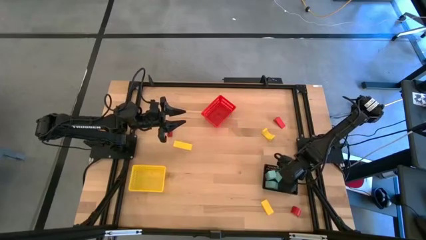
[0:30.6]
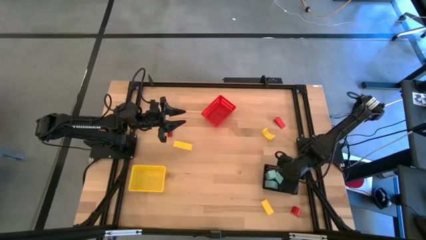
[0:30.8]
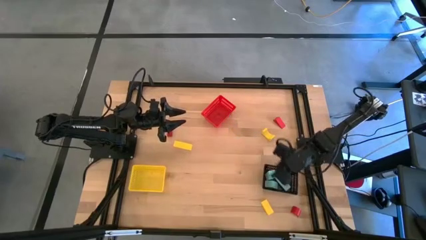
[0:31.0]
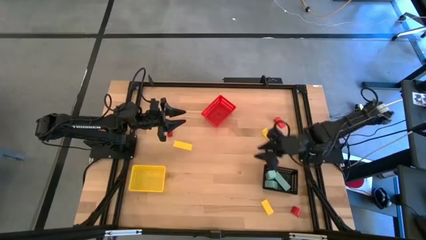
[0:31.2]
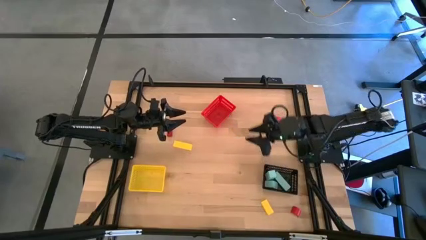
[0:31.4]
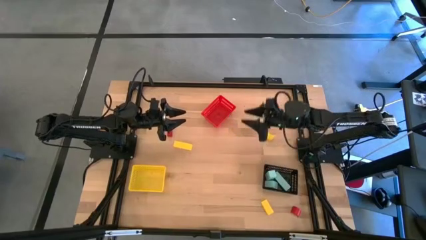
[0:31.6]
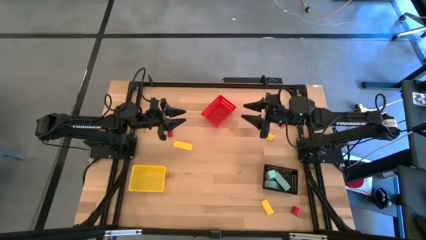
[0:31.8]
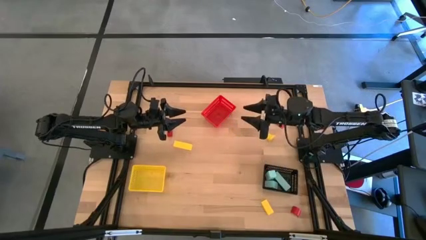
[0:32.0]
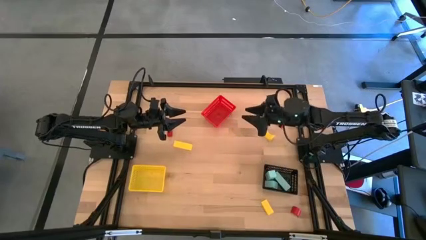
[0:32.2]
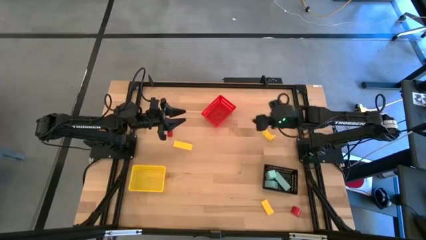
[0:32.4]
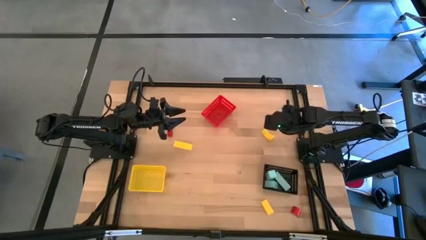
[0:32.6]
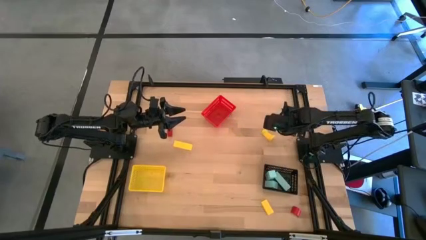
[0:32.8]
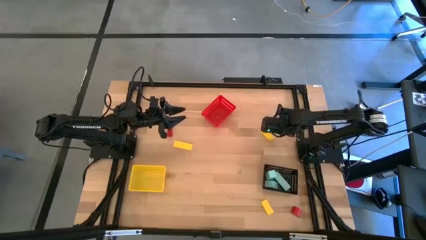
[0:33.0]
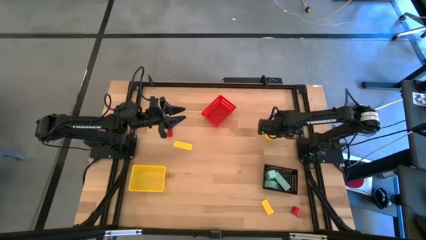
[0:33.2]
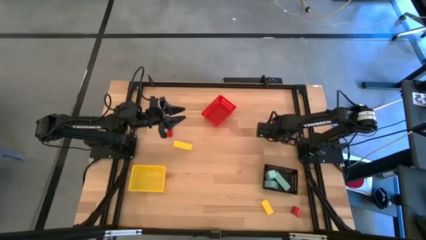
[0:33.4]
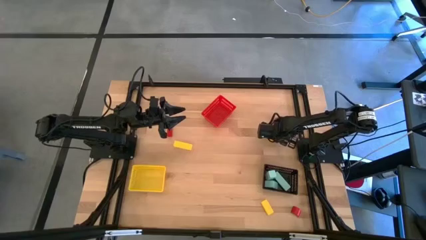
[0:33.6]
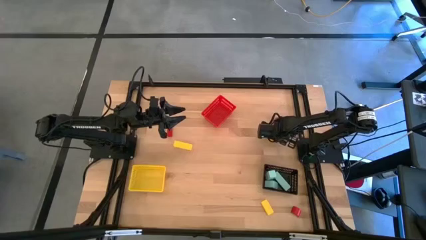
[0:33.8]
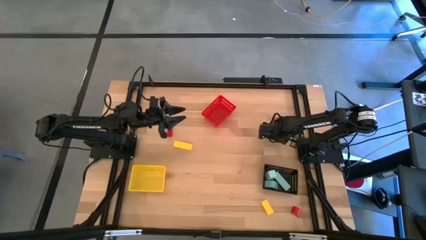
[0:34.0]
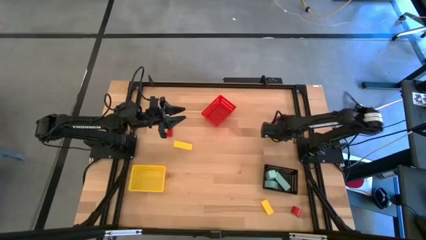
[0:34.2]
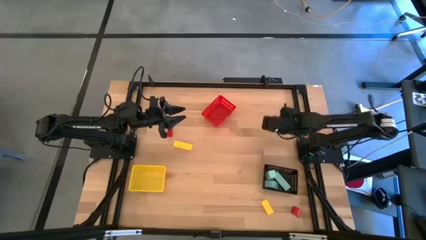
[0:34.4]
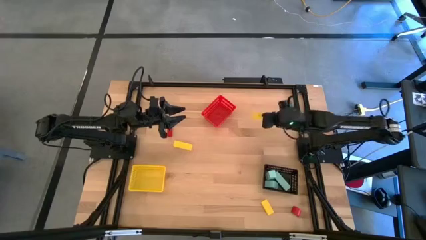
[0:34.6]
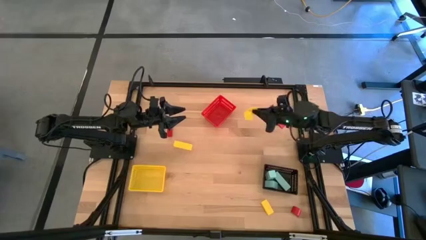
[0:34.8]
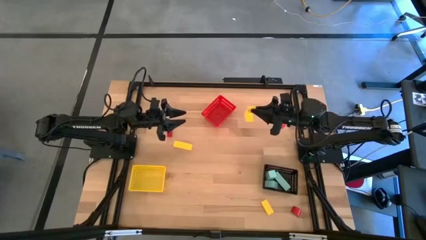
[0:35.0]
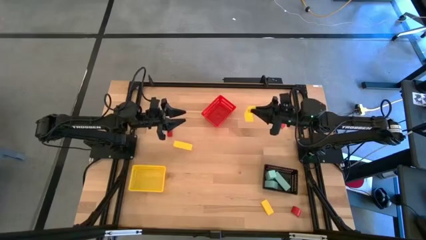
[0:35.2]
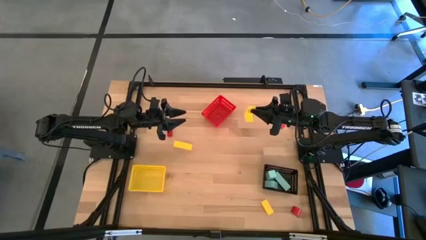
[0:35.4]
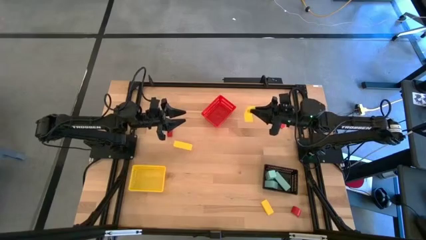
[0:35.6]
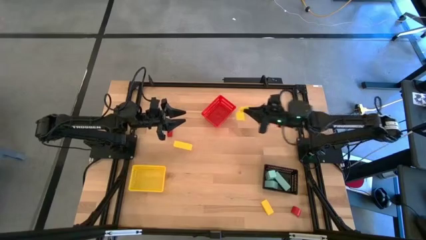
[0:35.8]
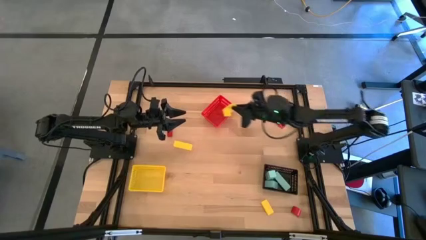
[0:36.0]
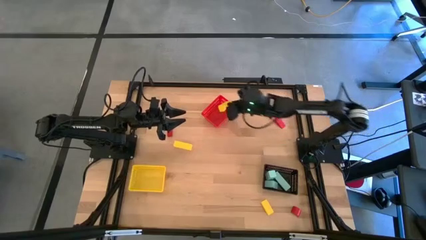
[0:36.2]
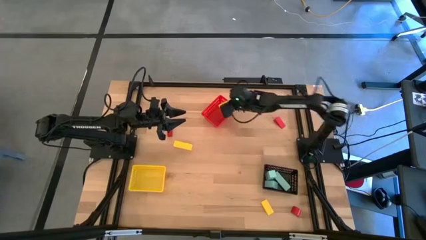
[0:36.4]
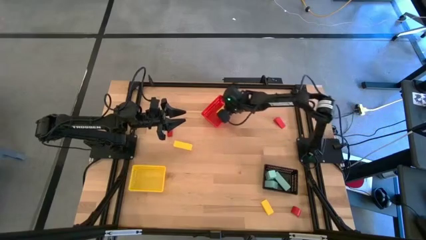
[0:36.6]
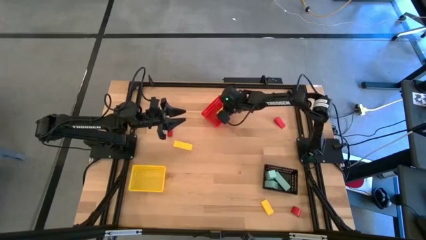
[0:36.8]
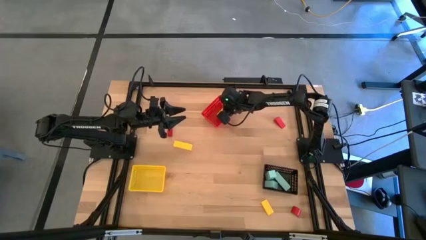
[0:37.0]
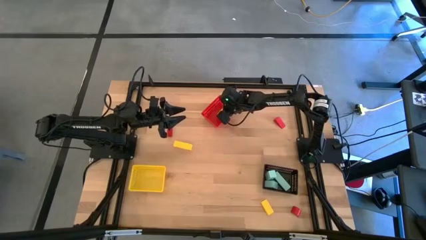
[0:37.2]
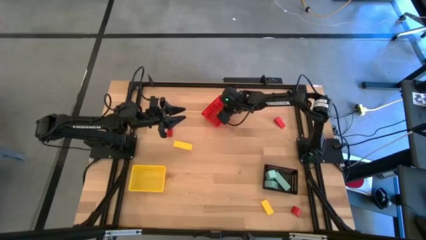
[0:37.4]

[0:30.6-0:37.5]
Task: Sort & place blocks by color
Put the top right yellow block into the red bin

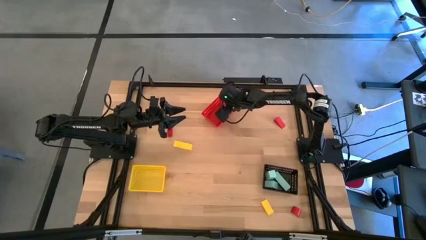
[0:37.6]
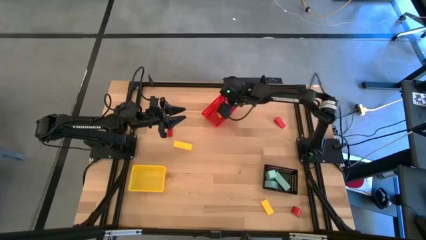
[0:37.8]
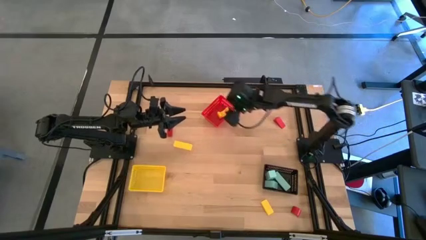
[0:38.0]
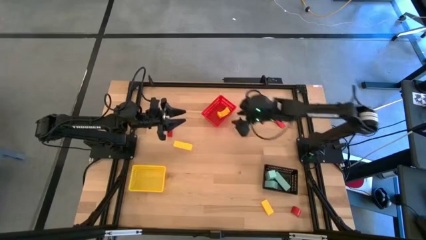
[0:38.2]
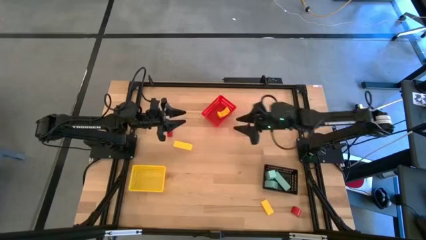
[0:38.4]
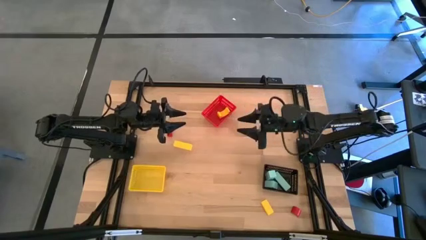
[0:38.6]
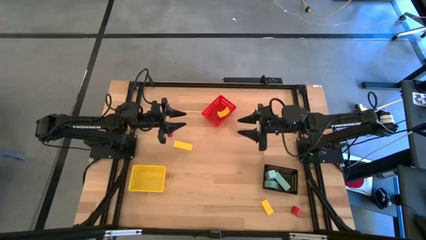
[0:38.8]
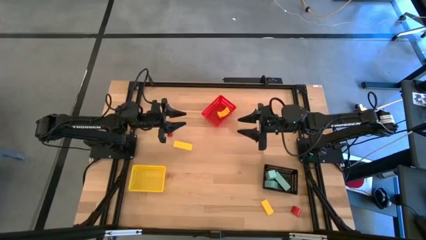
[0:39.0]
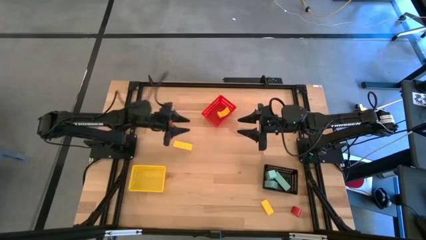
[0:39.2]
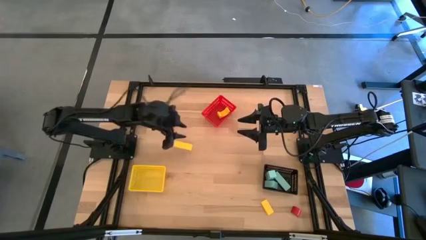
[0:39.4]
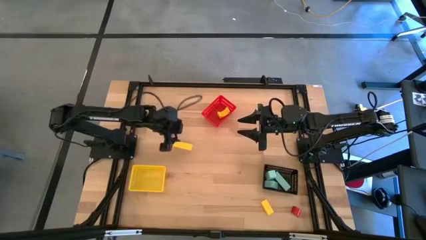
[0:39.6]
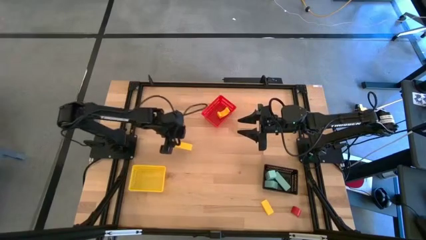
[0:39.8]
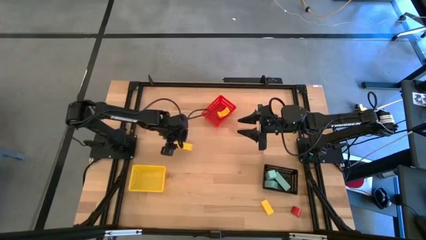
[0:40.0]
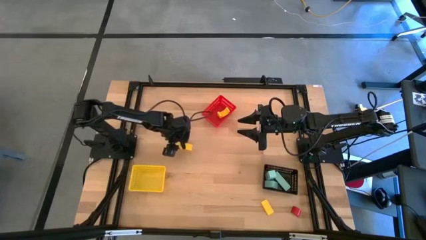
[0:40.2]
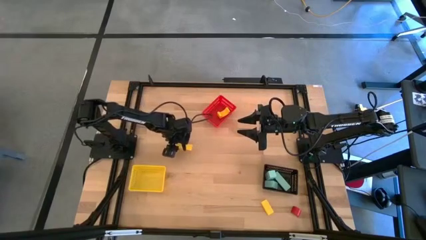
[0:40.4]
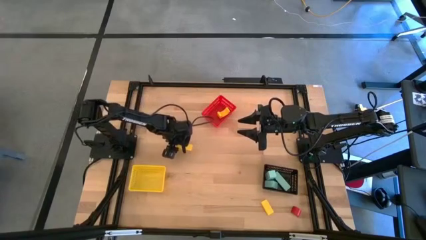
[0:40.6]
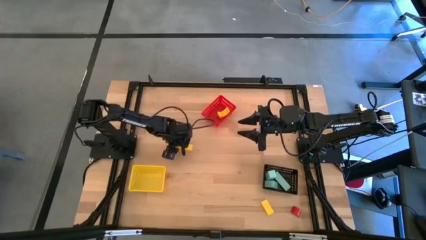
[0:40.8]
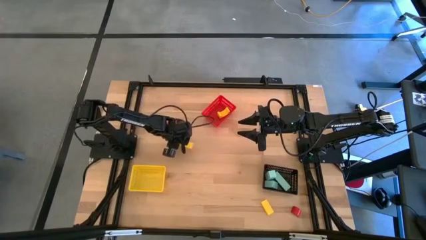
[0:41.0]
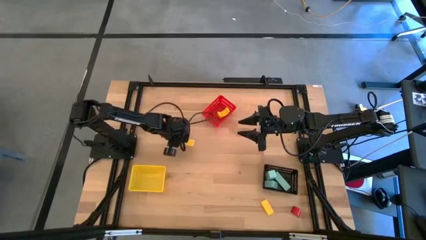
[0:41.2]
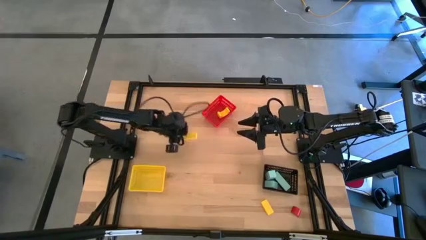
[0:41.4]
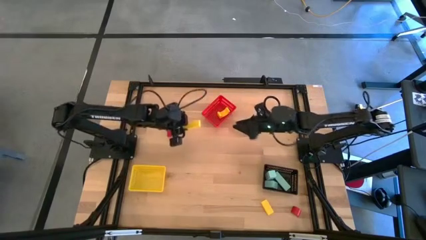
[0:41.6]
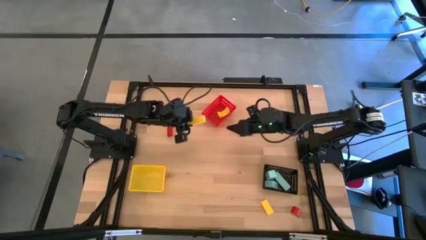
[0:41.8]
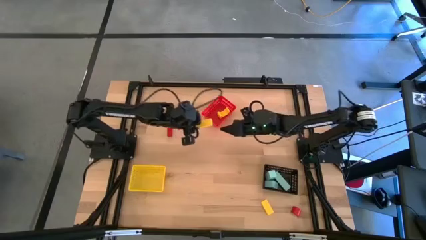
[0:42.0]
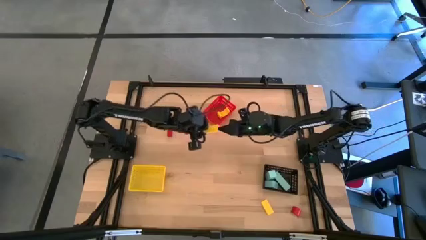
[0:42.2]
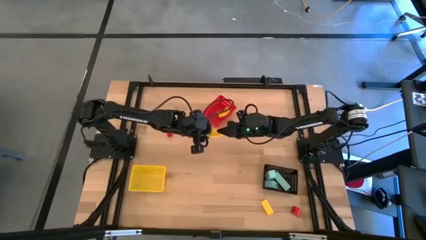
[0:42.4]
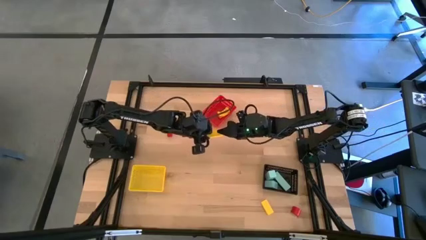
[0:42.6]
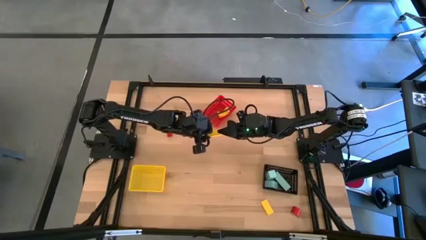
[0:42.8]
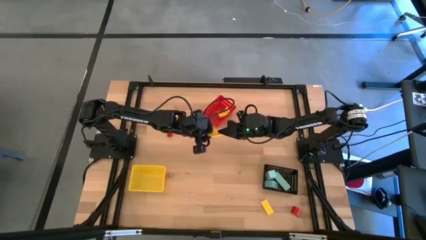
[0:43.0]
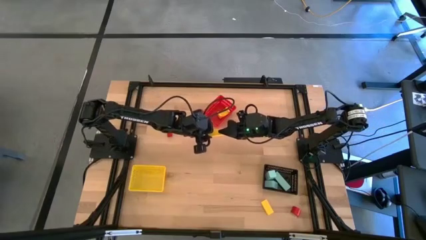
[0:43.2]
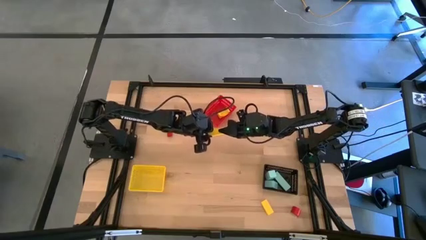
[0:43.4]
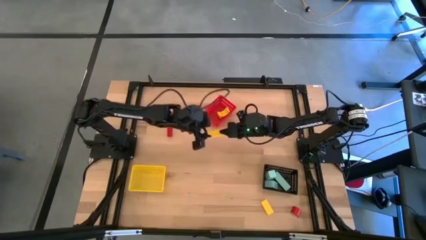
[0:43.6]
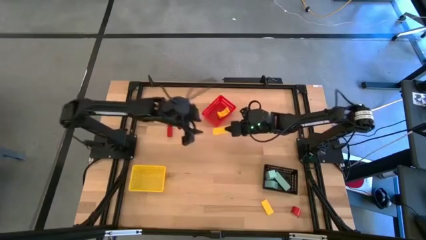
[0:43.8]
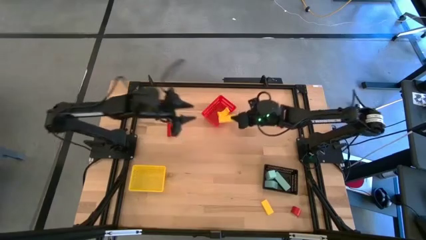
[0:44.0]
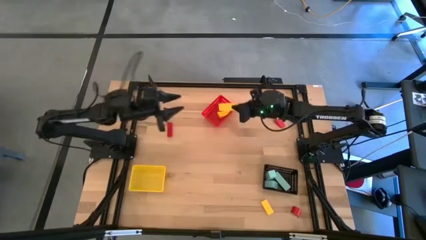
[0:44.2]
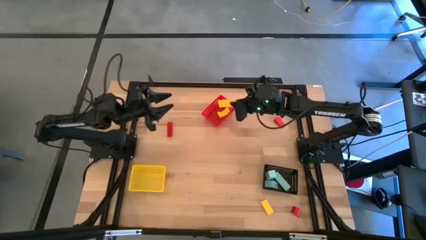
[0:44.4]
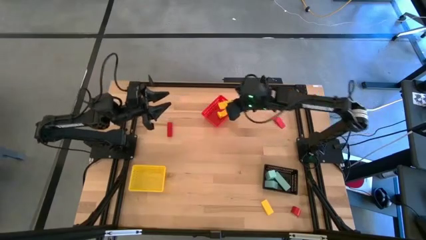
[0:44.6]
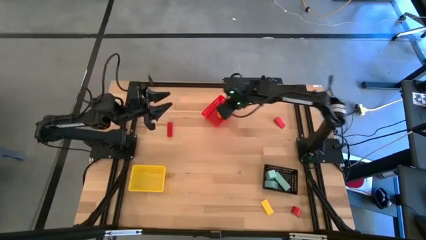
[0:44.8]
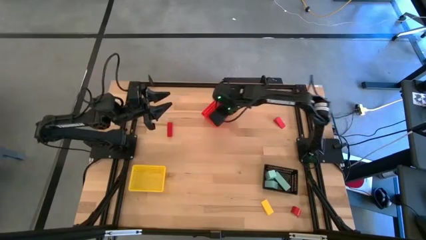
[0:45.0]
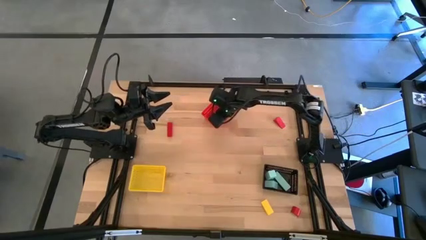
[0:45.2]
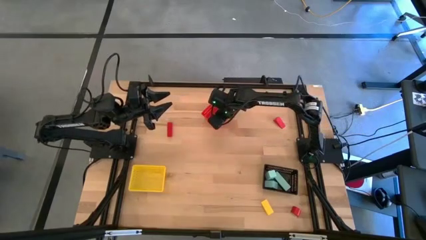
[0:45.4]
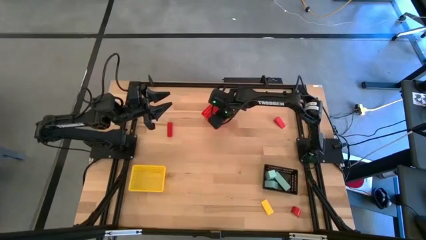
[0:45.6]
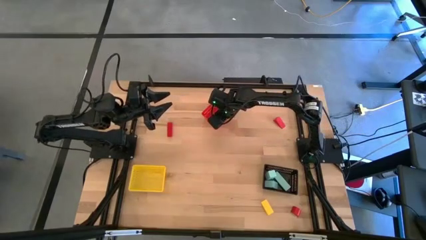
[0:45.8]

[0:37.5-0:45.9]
Put the top yellow block into the red bin

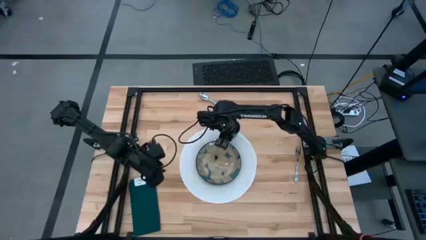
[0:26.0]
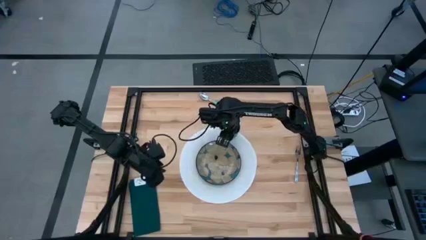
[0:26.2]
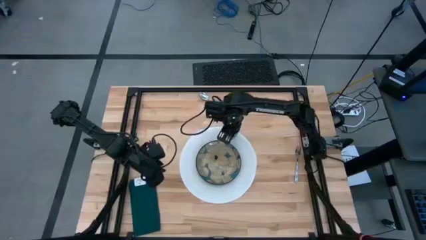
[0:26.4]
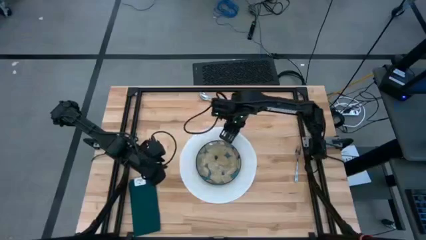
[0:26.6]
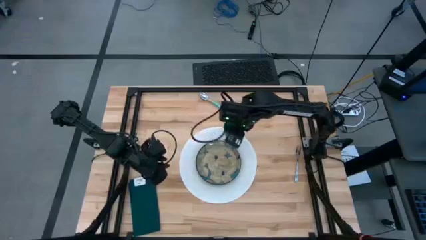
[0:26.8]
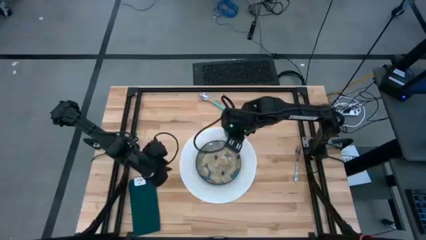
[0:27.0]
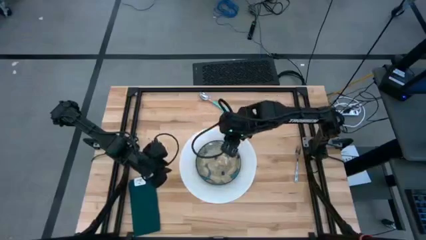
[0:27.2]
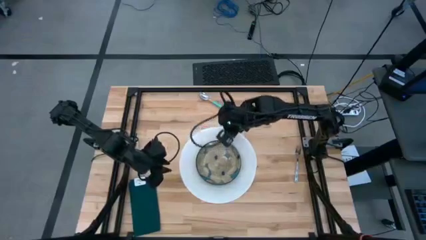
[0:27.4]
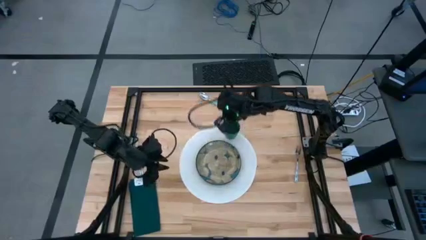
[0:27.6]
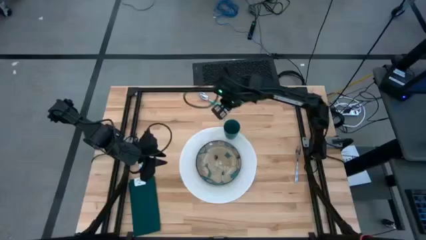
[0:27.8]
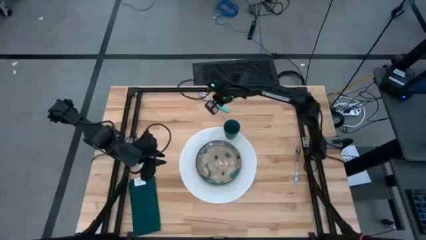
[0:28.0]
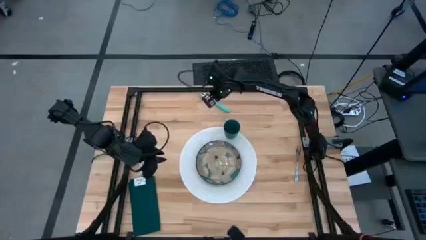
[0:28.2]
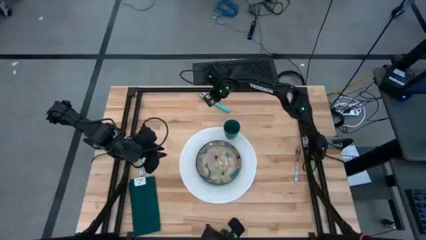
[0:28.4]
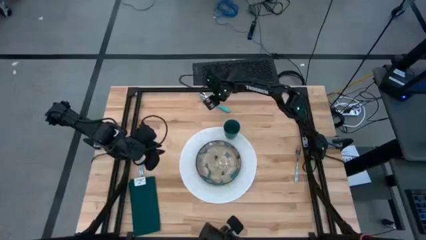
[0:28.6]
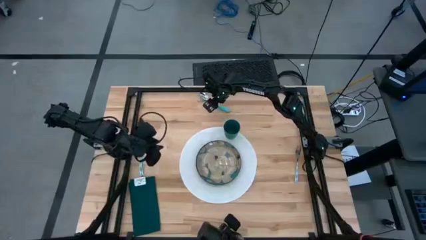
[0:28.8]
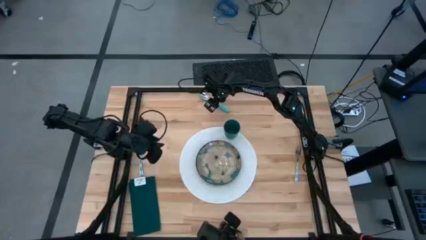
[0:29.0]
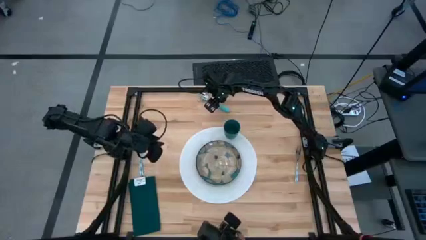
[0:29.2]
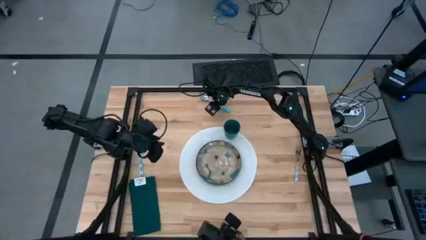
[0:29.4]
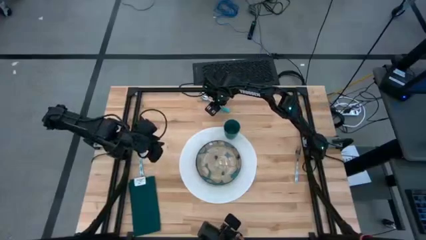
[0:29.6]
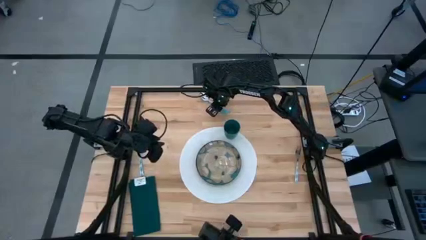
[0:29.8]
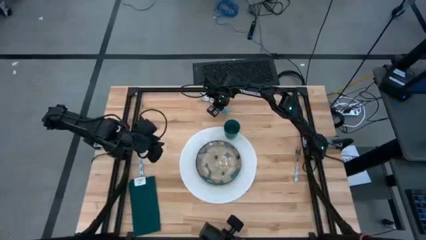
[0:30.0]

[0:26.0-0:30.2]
Task: Set table place
Put the blue spoon on the right side of the white table mat
